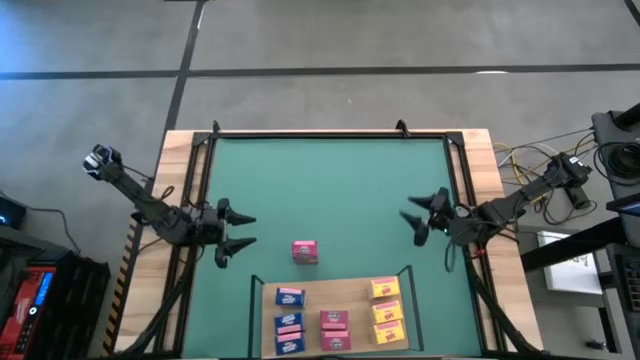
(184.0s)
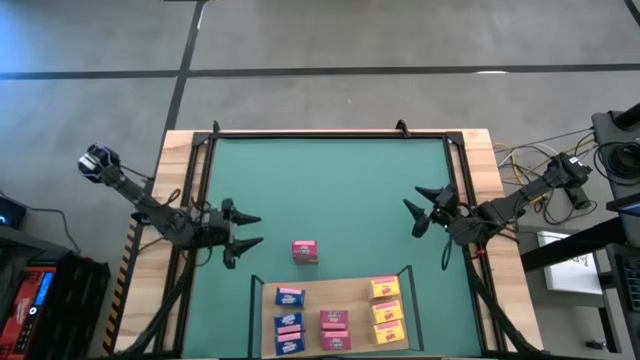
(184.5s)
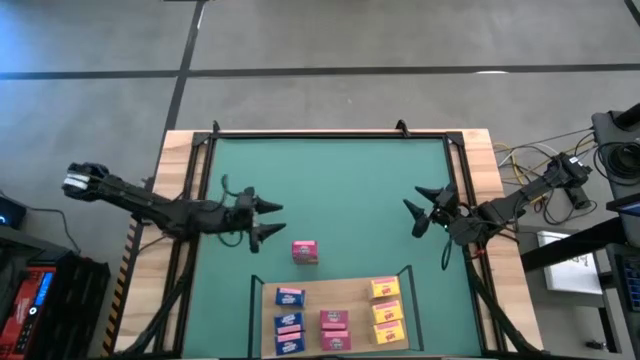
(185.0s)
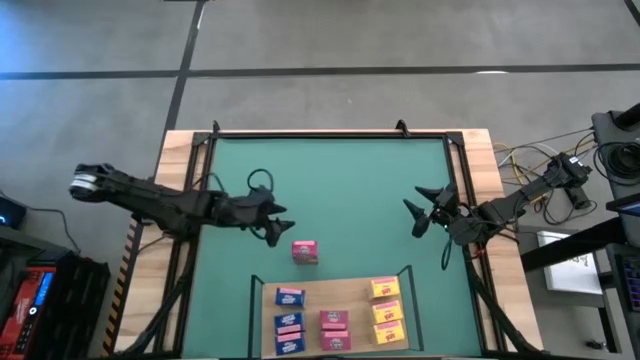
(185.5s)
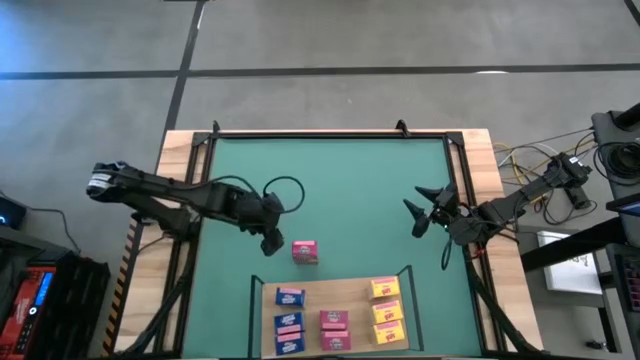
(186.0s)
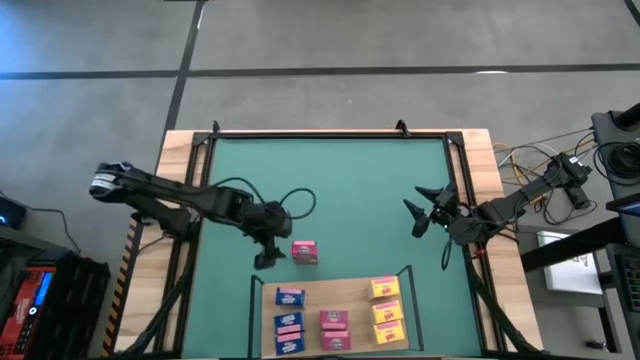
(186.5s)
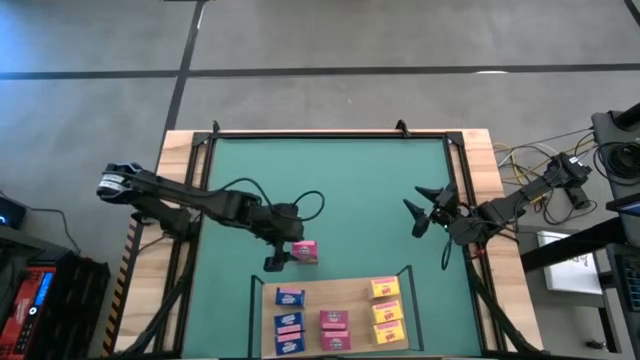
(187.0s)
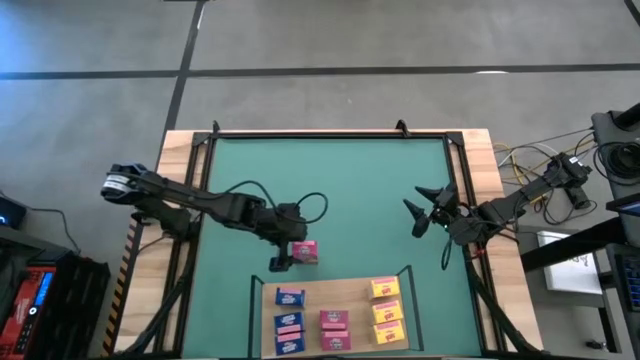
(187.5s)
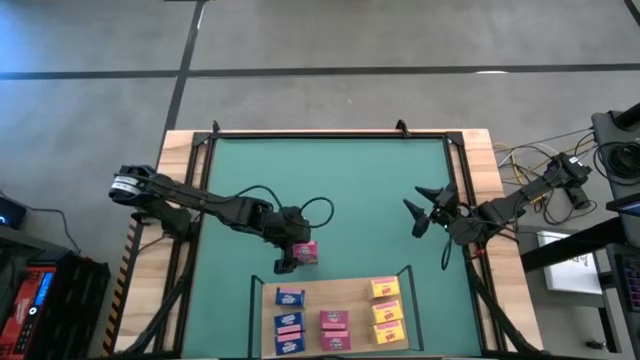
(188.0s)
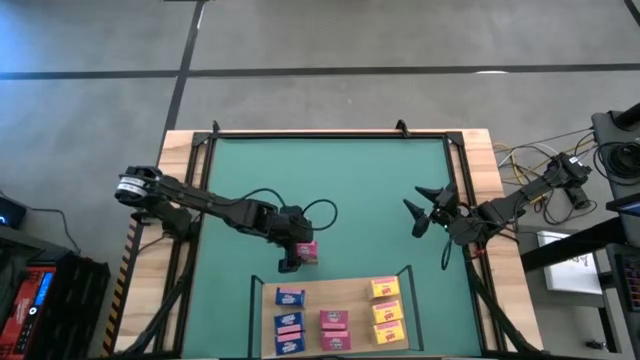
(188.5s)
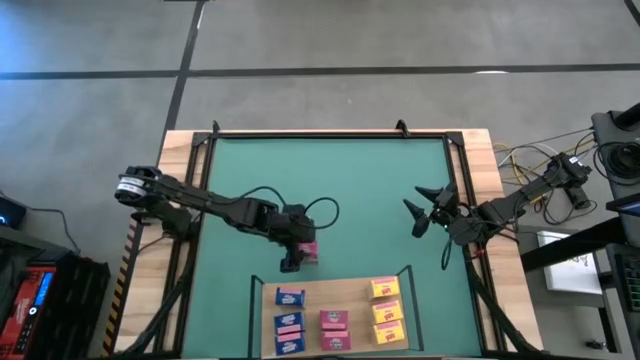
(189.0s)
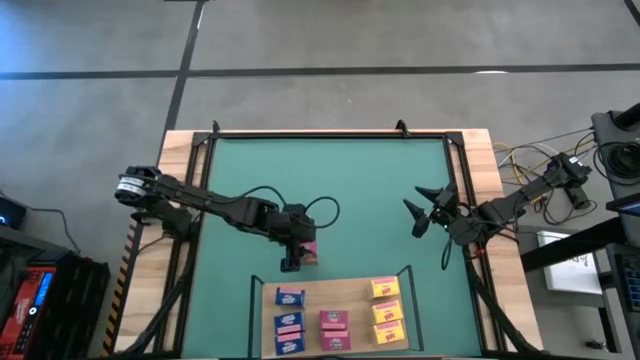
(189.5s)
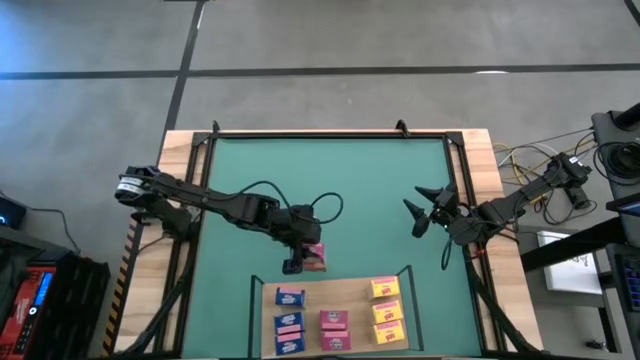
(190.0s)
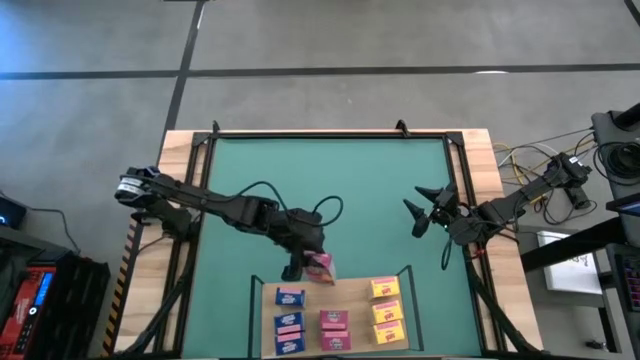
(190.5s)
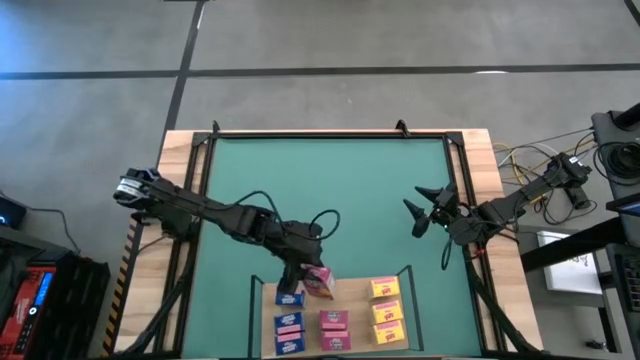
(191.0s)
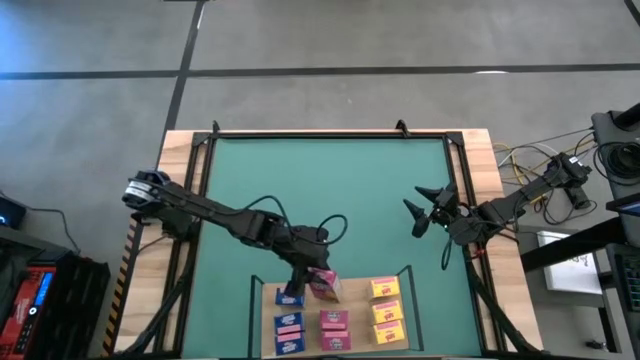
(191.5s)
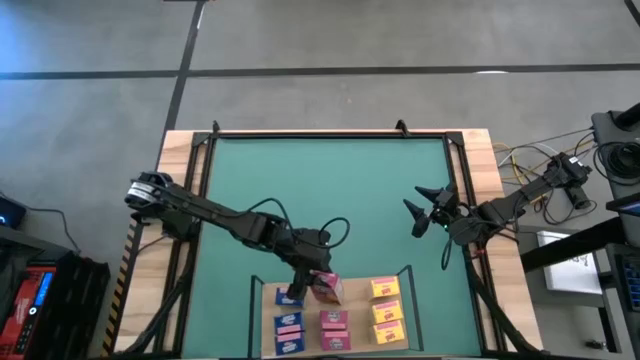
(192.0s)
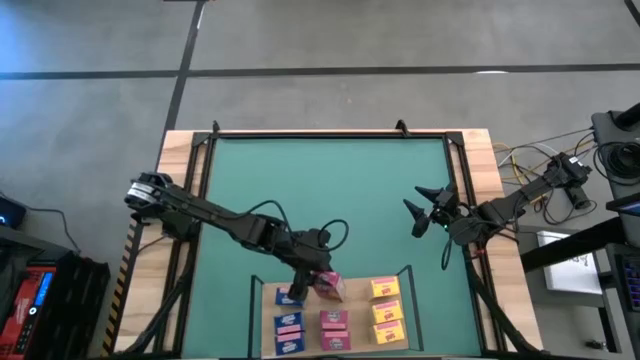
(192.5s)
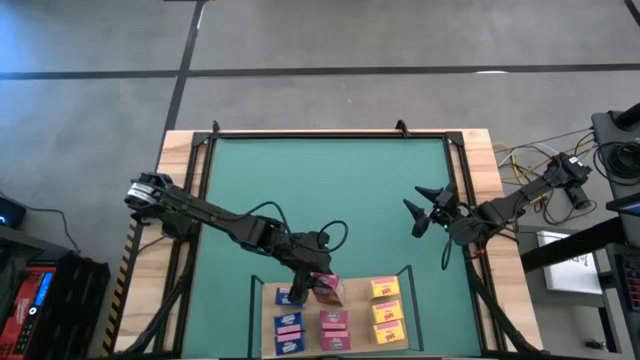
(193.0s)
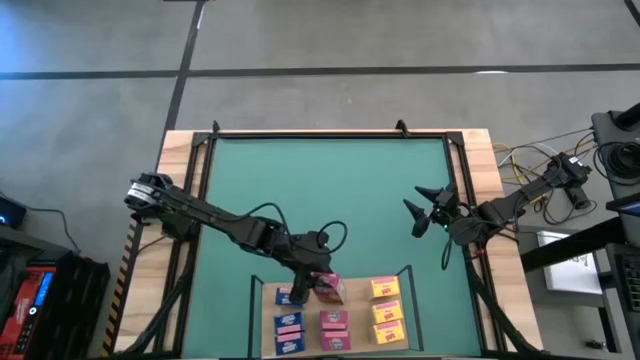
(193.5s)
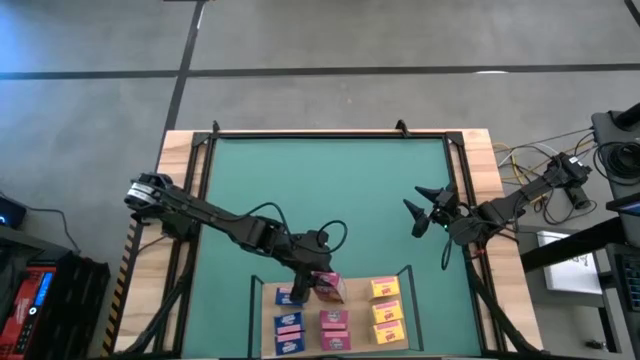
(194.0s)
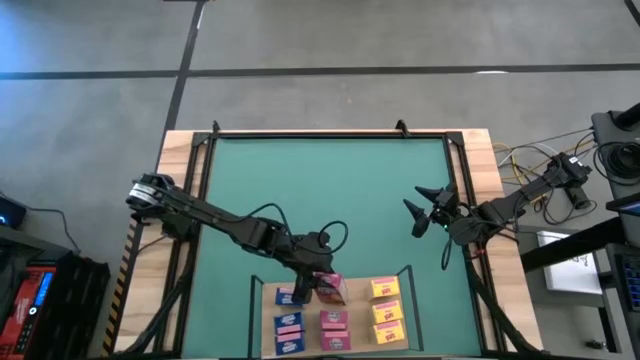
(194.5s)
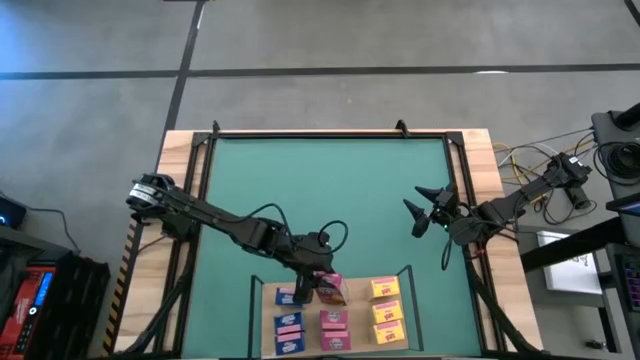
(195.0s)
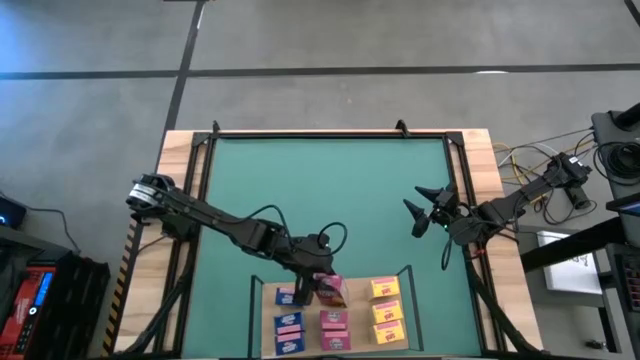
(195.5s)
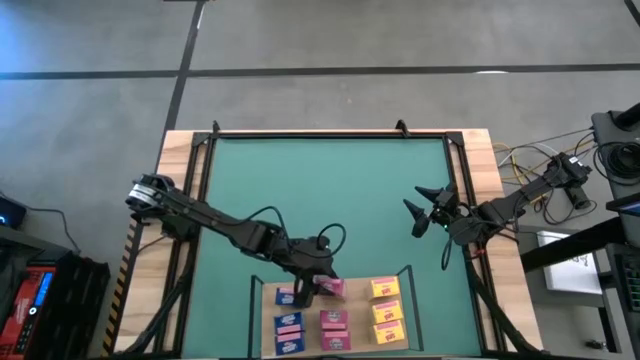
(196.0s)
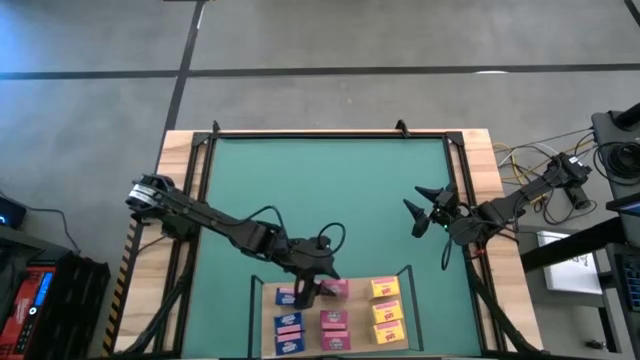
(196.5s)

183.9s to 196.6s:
Task: Stack cereal on shelf
Put the violet cereal box on the shelf aligned with the other violet cereal boxes

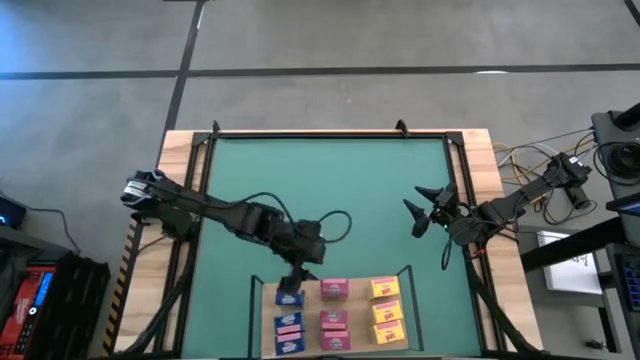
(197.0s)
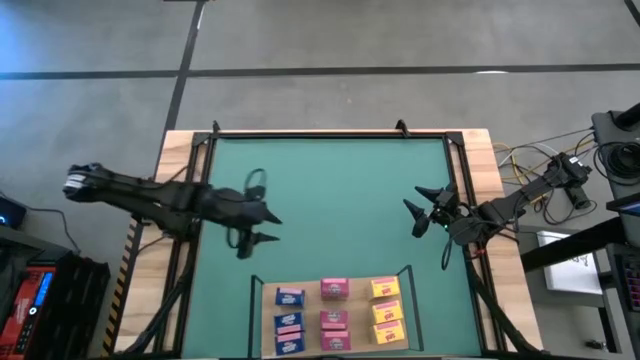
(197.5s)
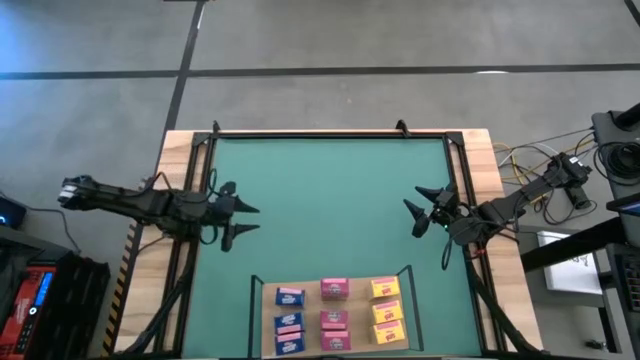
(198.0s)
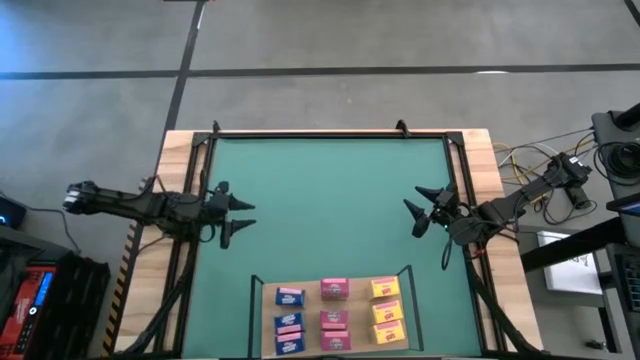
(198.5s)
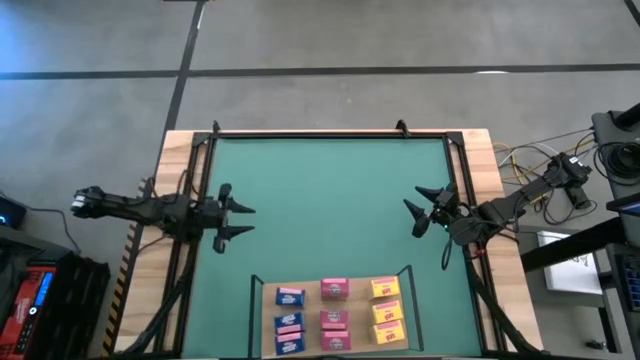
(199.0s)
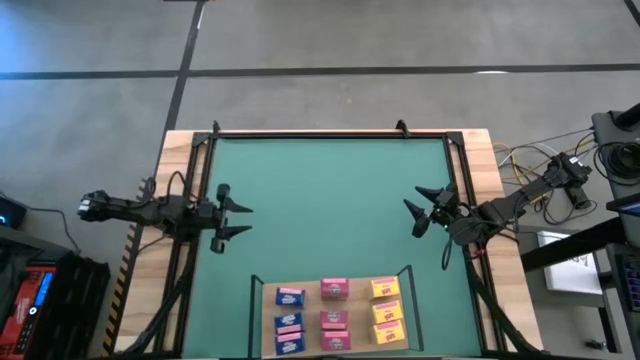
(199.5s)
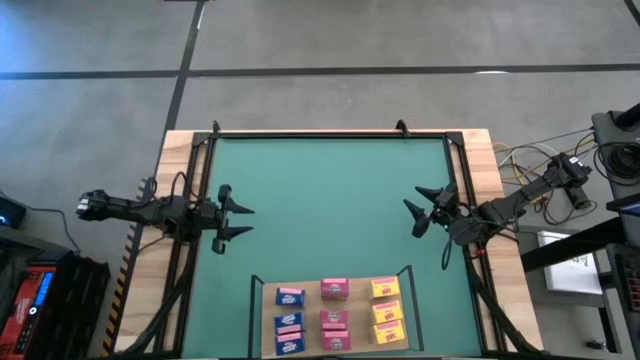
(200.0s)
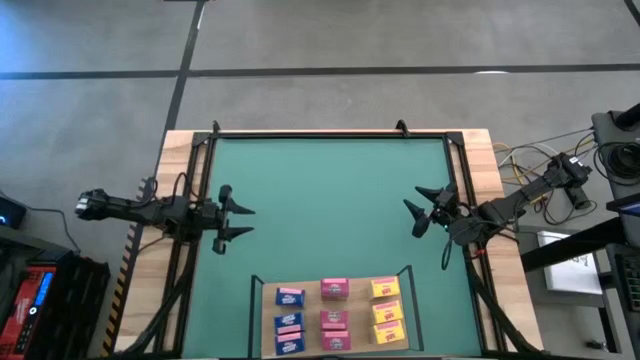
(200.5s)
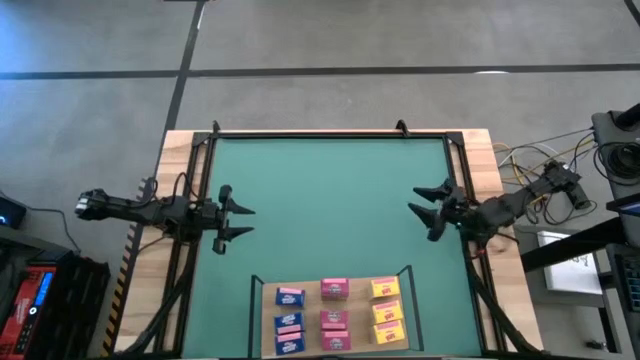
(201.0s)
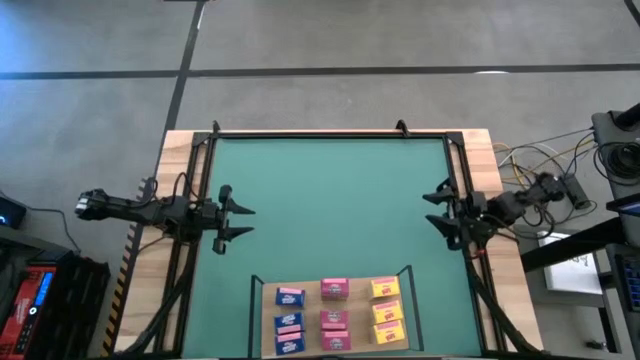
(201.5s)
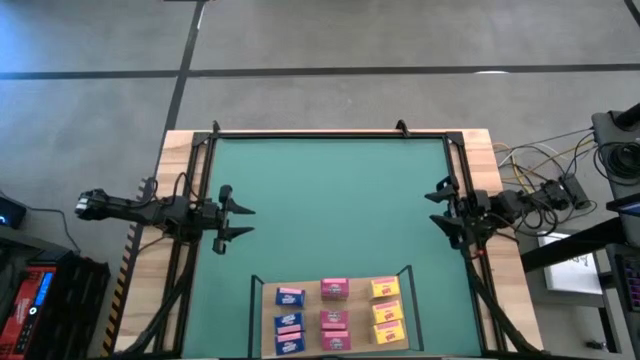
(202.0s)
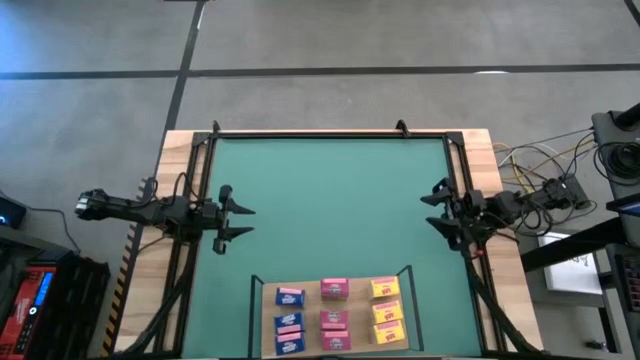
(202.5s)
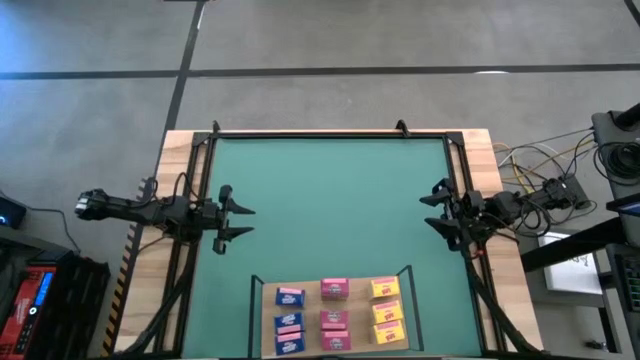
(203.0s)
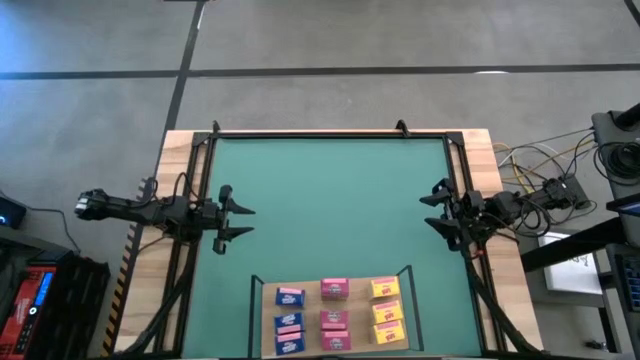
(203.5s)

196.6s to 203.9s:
Return to Home Position

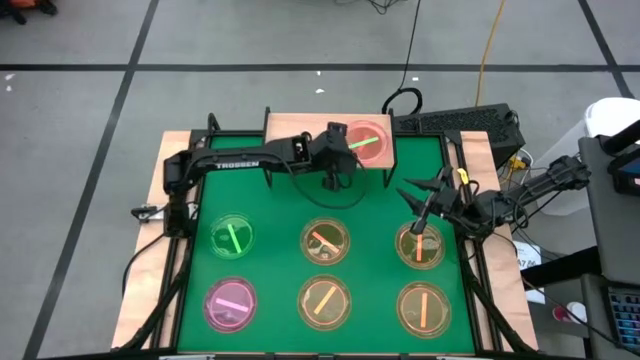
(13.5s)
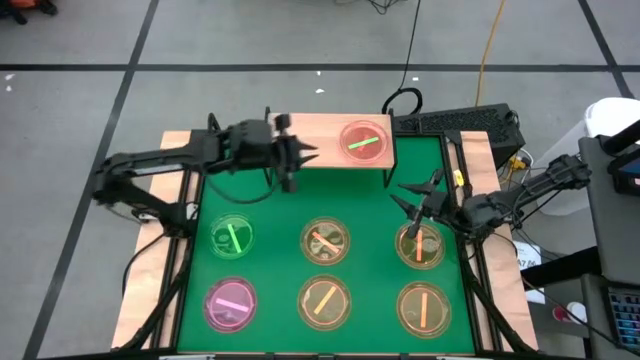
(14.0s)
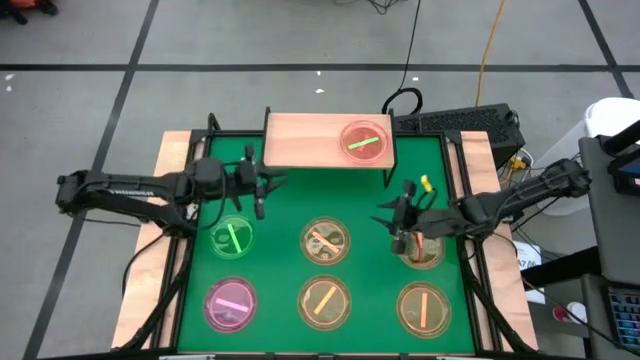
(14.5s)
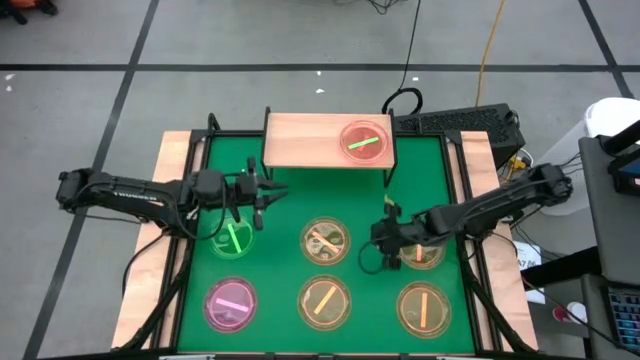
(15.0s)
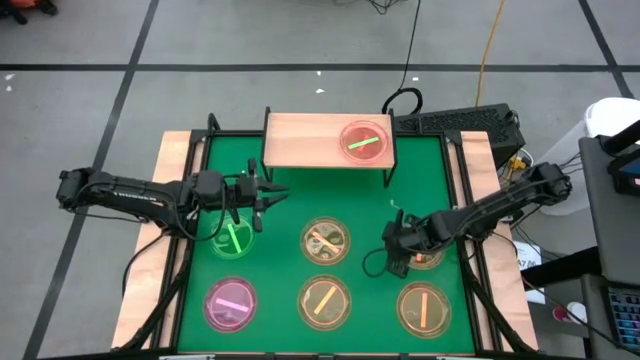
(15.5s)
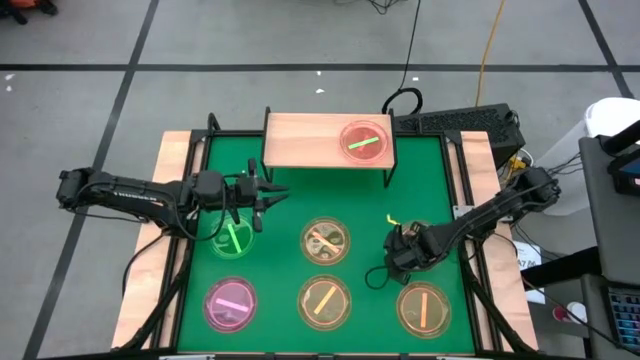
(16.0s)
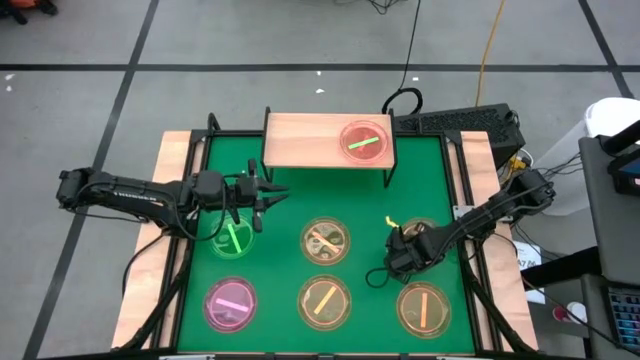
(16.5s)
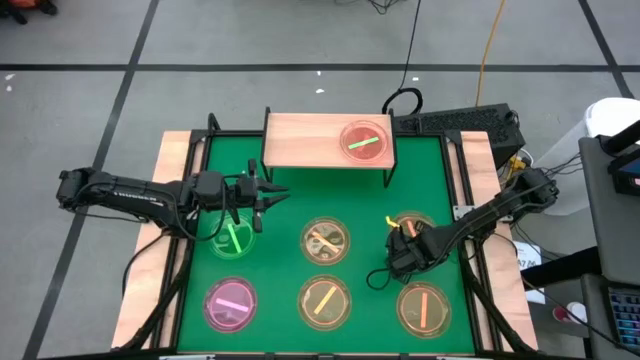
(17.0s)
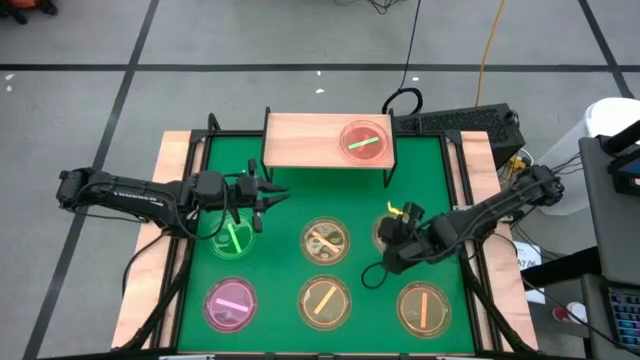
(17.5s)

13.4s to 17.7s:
Task: Place and stack plates onto a shelf
Stack the top right orange plate on top of the green plate on the shelf
